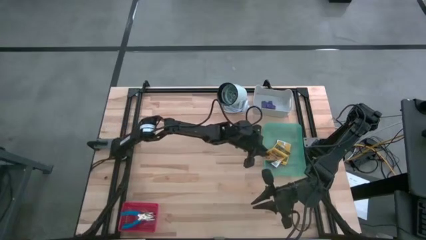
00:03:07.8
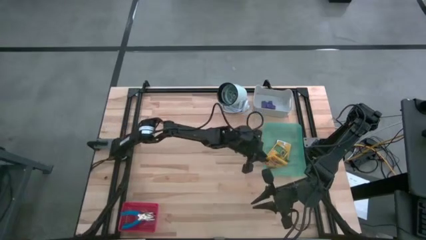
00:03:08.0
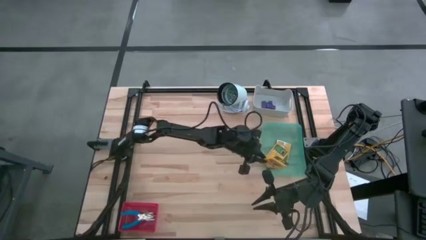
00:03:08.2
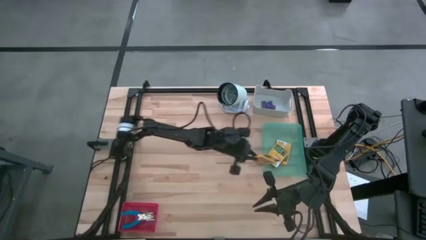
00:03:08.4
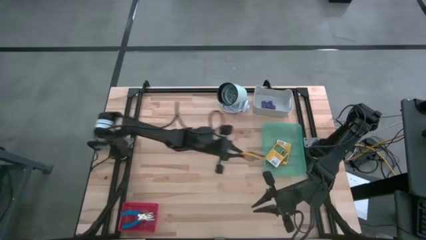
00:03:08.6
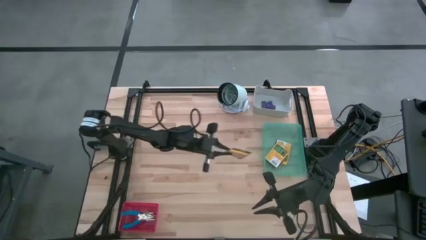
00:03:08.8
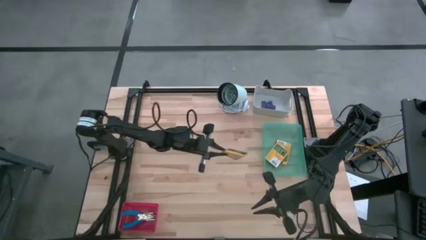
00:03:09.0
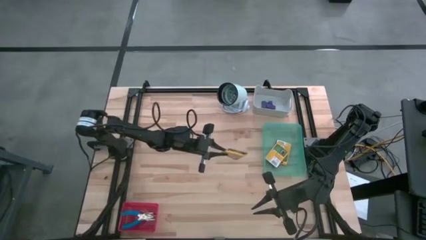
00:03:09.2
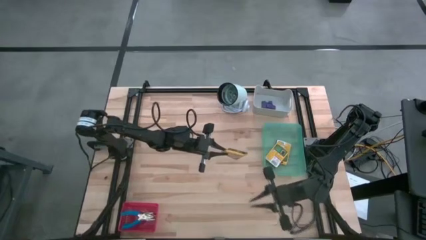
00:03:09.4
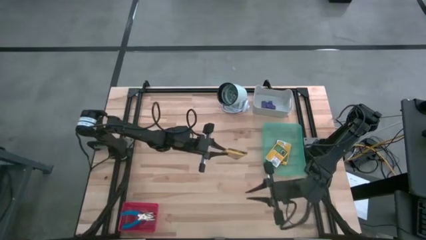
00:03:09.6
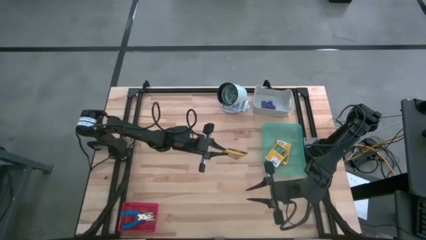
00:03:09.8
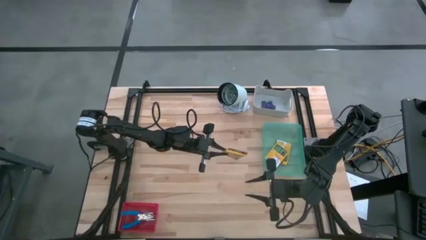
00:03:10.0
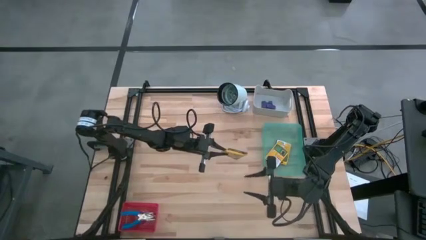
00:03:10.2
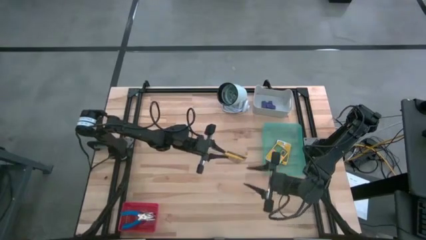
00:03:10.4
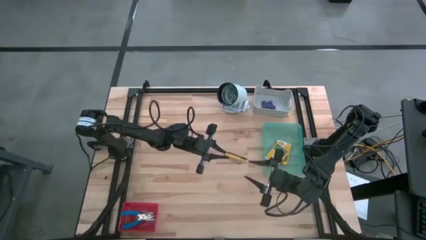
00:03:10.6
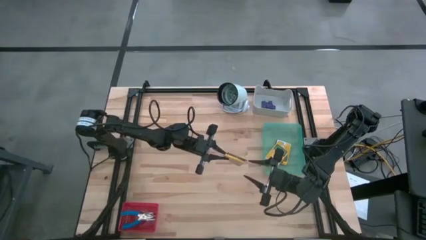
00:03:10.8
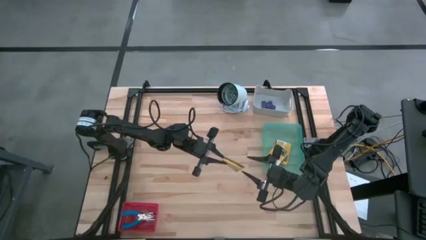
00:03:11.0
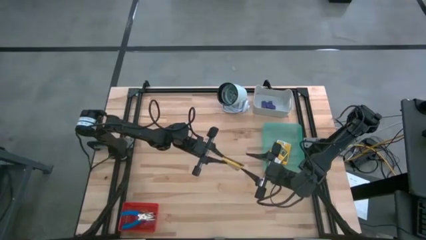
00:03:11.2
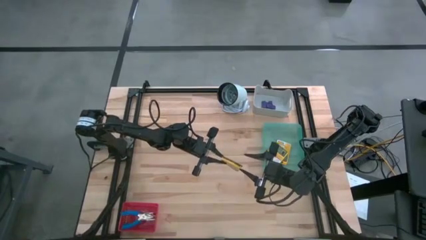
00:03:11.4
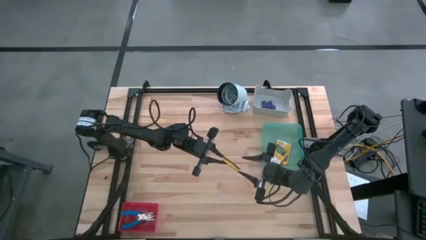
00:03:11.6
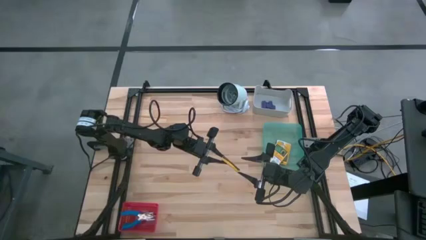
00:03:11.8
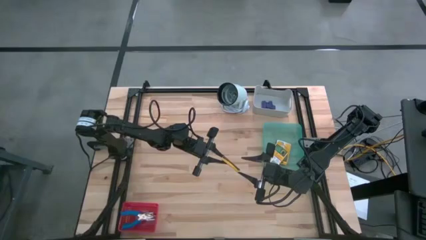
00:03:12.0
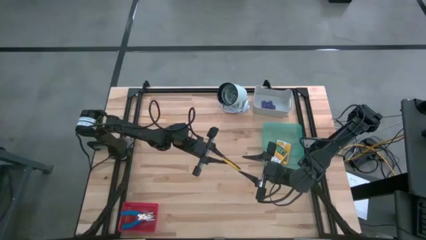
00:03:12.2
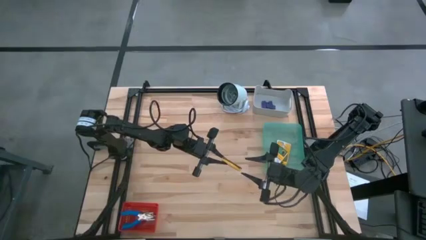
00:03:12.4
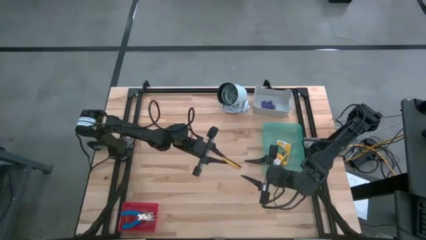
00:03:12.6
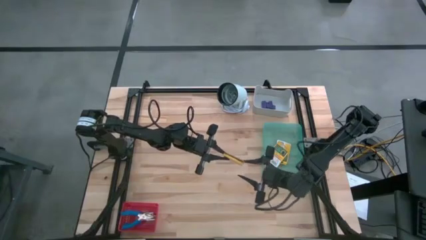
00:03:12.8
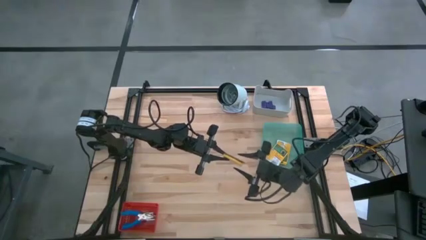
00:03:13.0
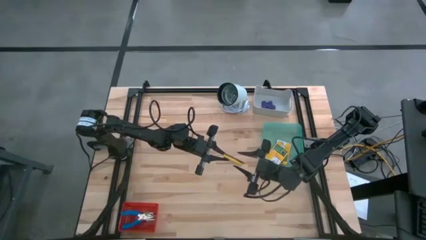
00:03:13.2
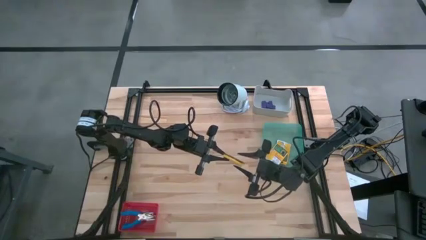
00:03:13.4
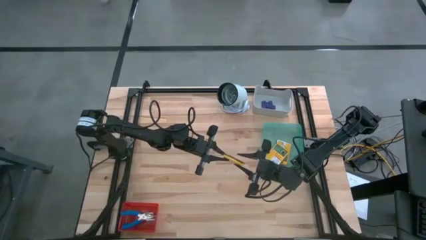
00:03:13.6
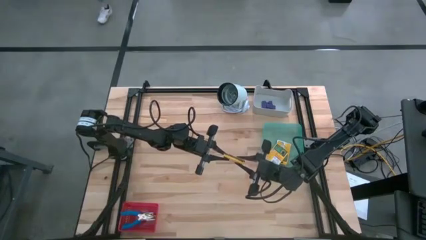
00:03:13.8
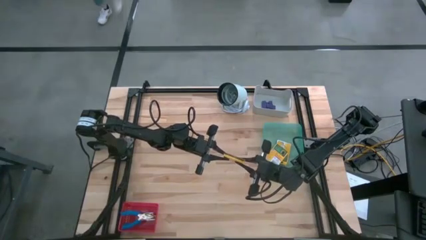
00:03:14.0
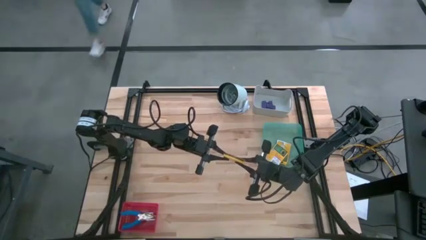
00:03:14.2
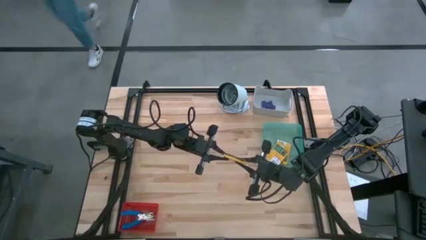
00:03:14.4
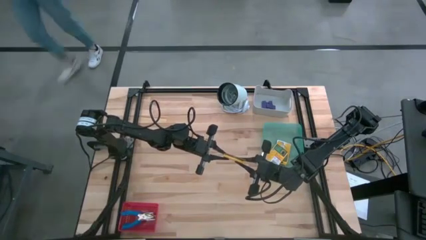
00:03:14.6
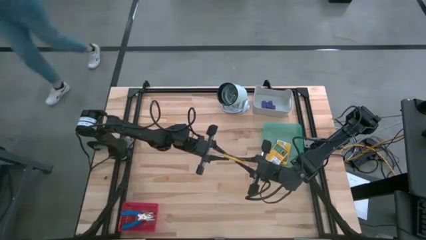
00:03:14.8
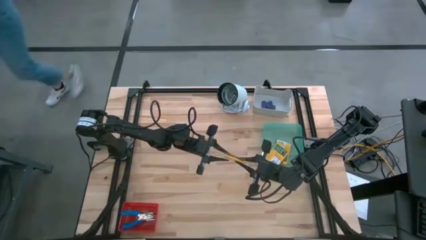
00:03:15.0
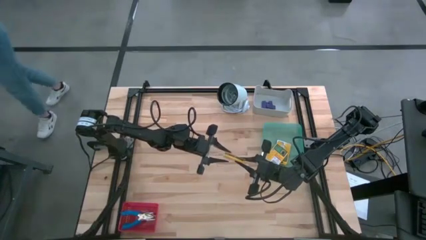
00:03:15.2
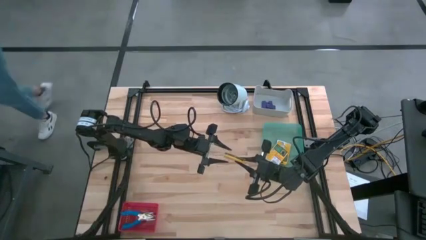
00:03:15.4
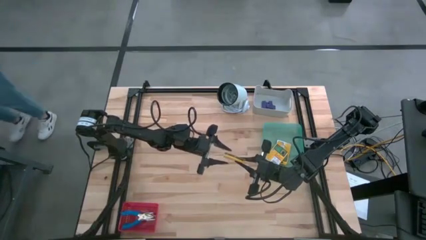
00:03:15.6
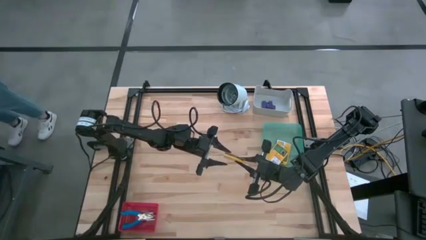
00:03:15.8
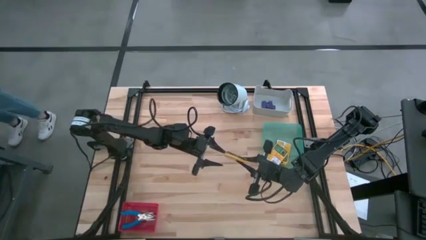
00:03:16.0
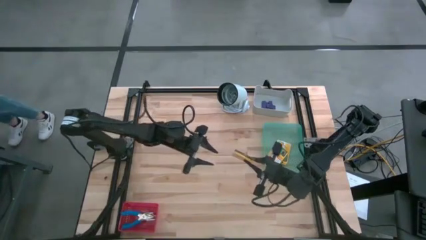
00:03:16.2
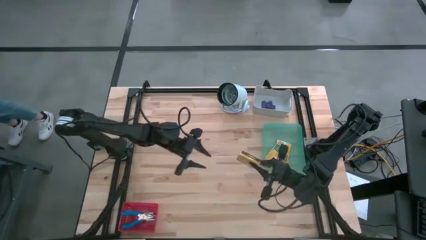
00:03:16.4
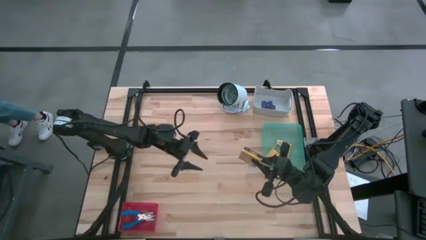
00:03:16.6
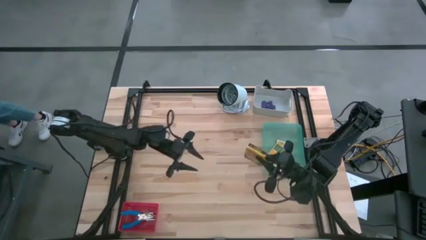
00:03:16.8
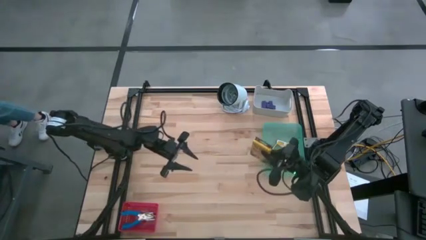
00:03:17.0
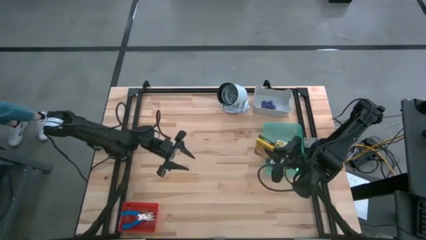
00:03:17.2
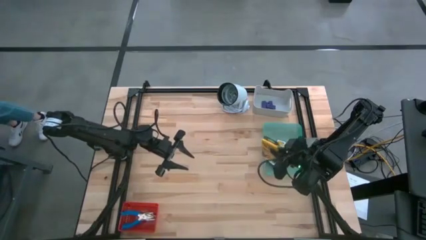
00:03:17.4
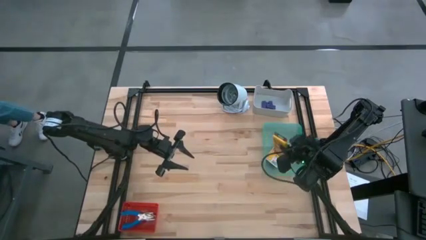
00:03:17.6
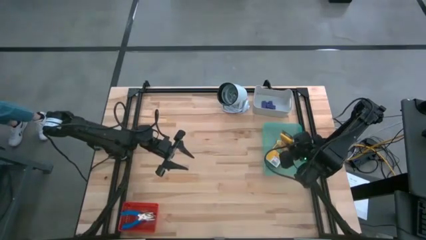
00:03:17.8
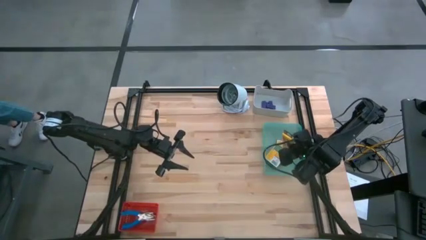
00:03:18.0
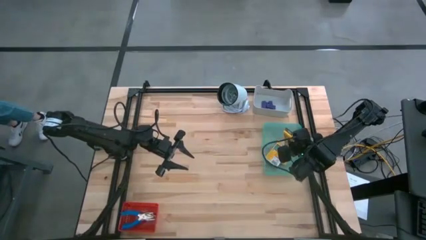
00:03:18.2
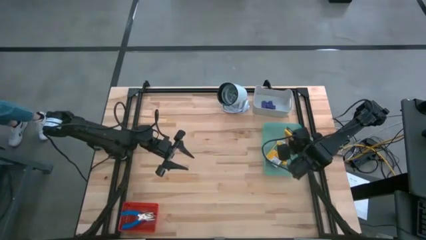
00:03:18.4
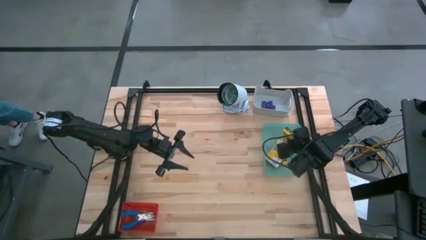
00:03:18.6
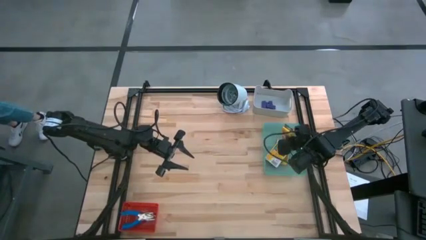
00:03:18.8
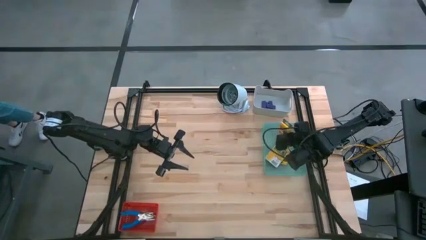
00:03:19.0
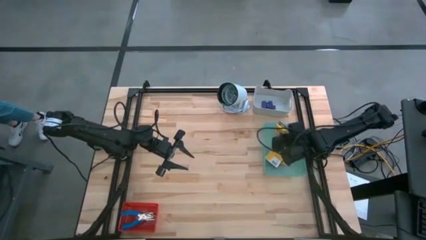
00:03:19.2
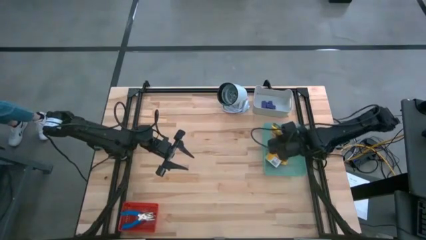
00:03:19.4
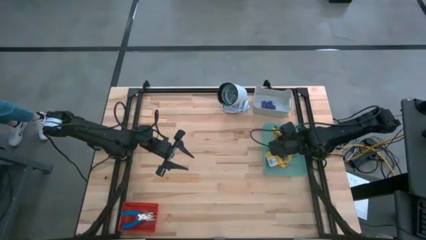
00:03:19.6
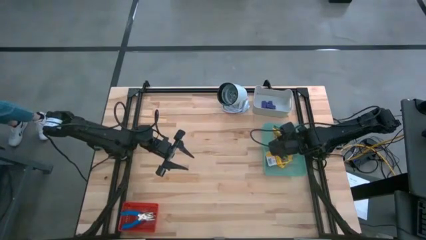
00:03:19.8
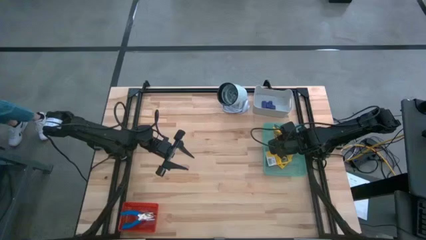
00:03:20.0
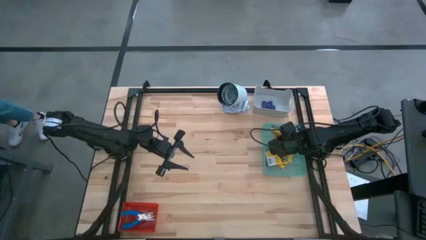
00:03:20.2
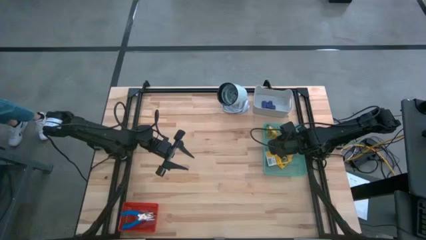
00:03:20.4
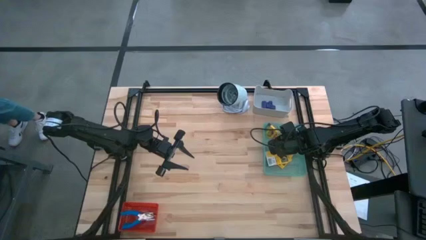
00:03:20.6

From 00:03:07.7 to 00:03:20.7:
Task: Pick & Place School Supplies
Put the crayon box into the green bin
